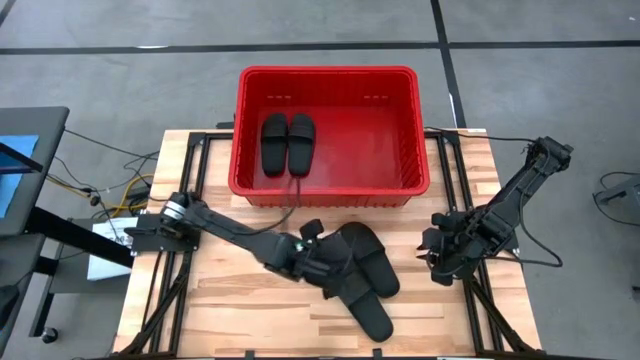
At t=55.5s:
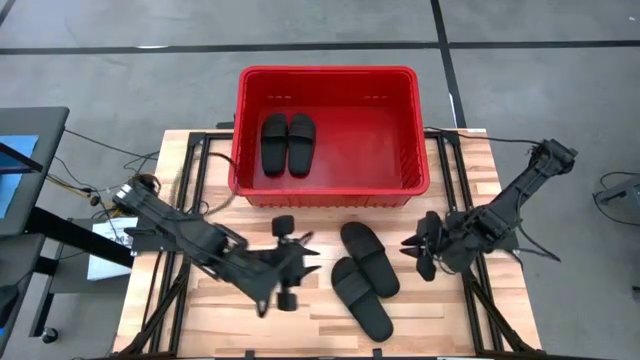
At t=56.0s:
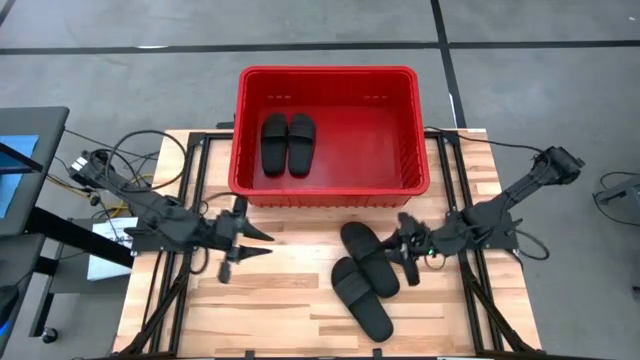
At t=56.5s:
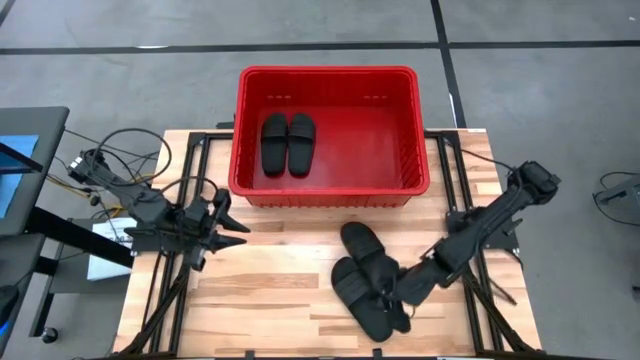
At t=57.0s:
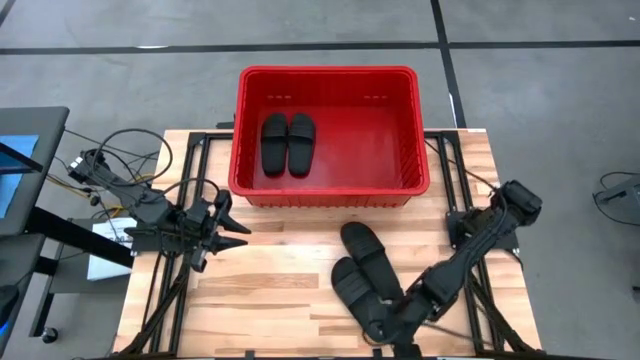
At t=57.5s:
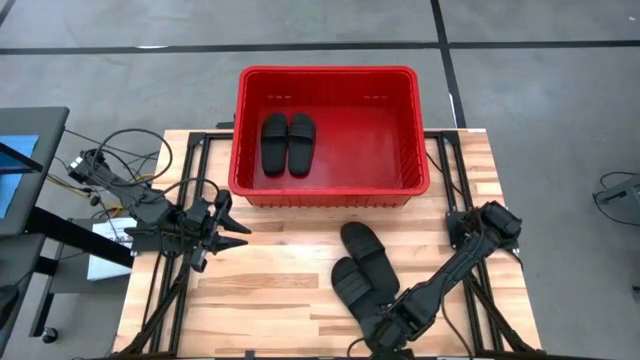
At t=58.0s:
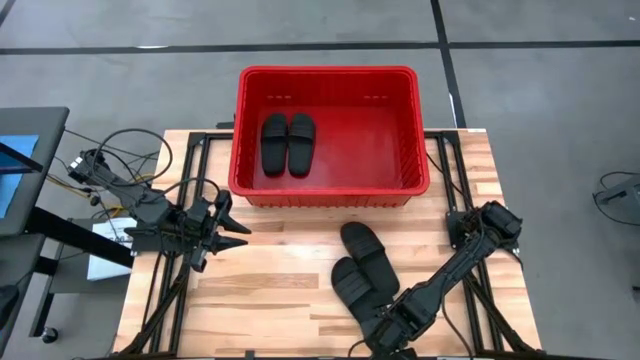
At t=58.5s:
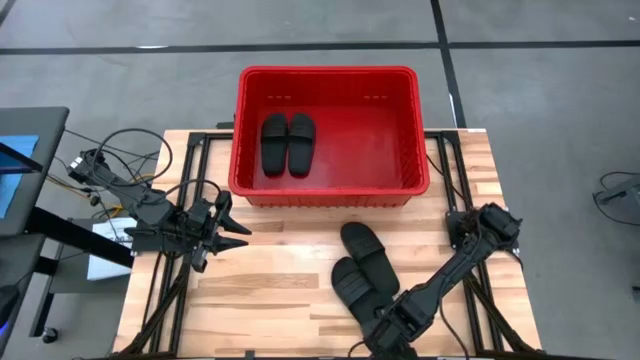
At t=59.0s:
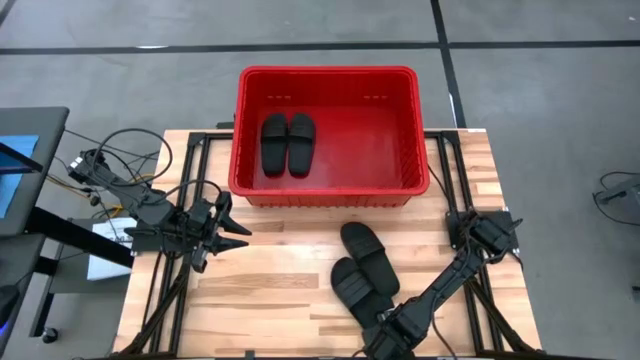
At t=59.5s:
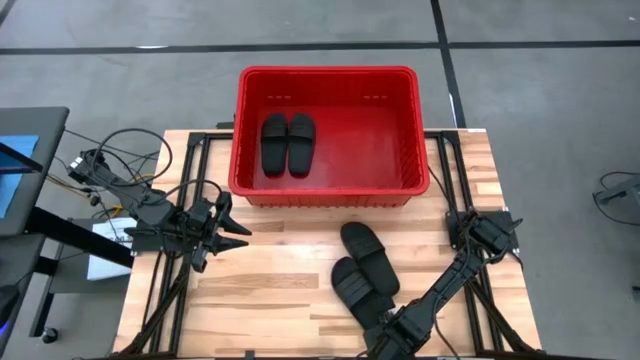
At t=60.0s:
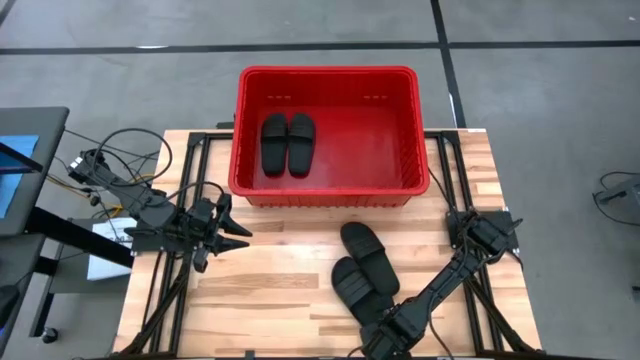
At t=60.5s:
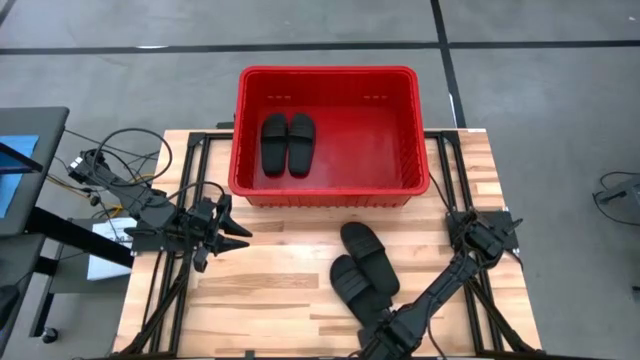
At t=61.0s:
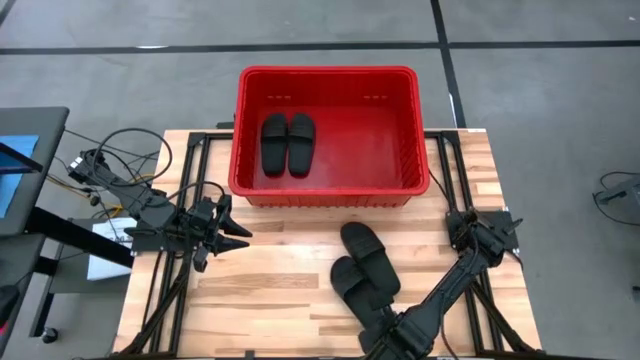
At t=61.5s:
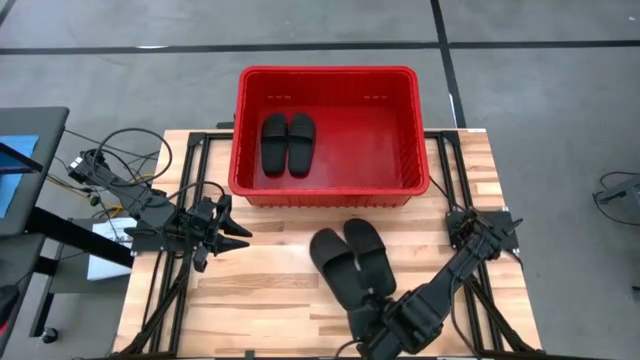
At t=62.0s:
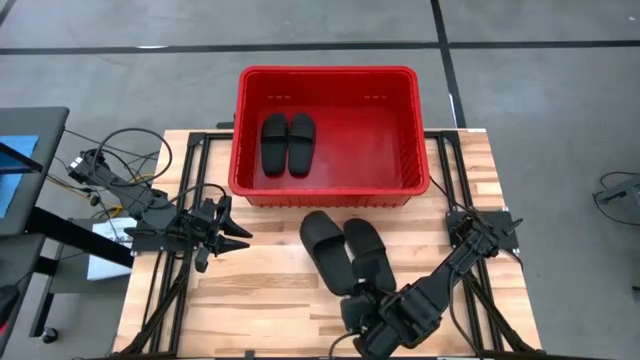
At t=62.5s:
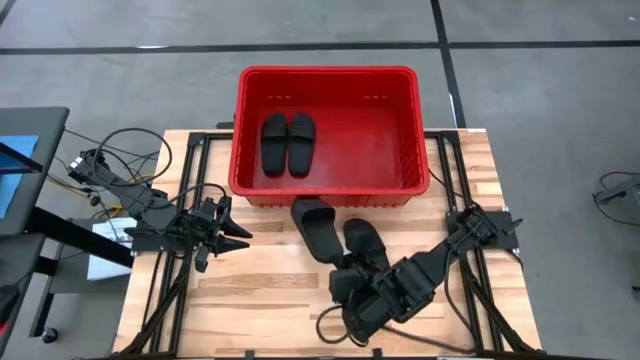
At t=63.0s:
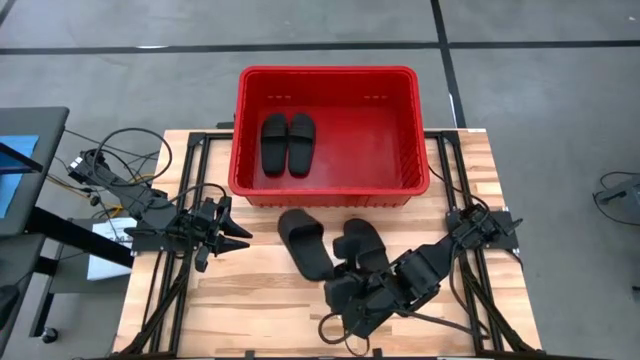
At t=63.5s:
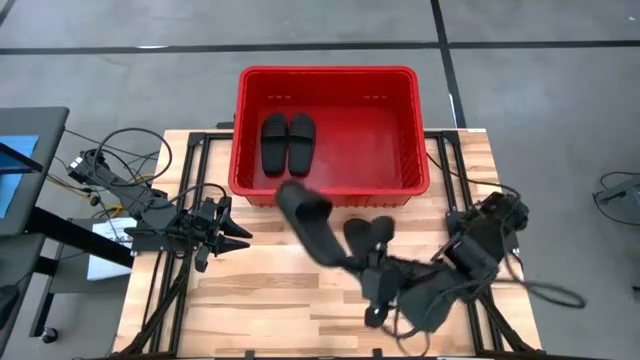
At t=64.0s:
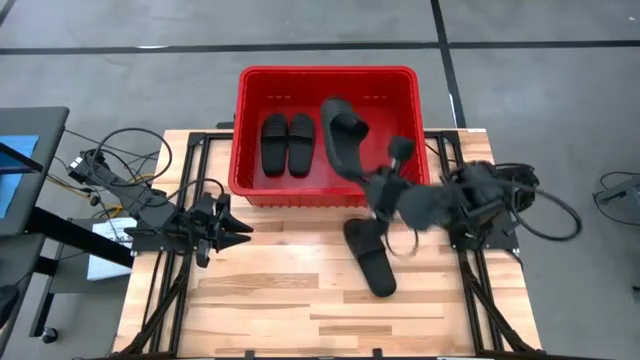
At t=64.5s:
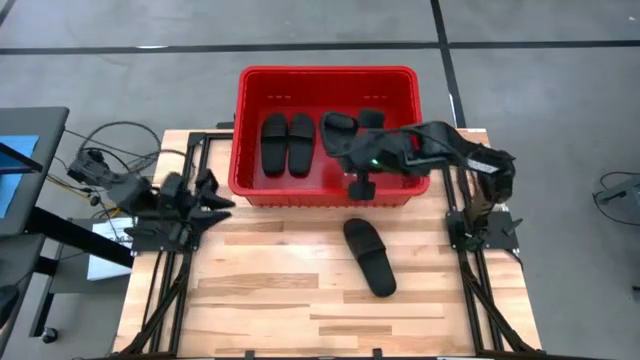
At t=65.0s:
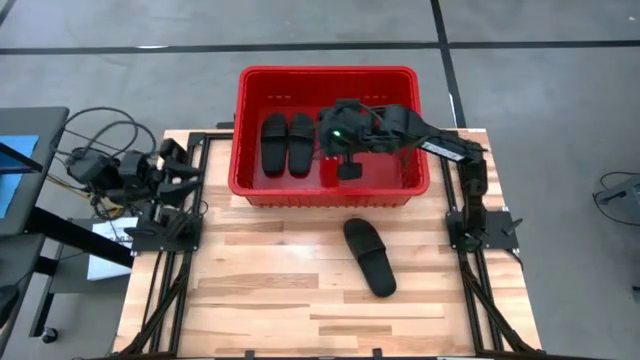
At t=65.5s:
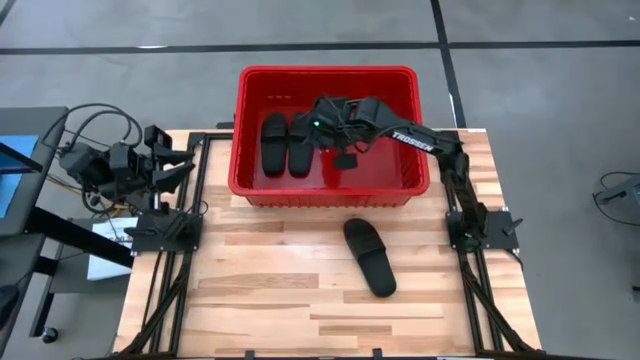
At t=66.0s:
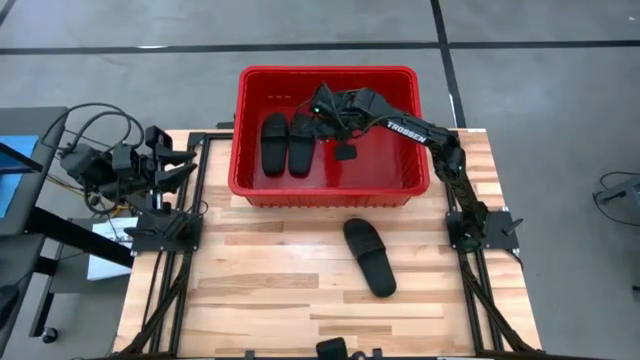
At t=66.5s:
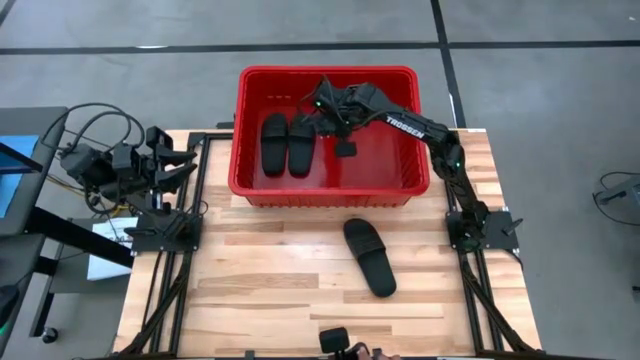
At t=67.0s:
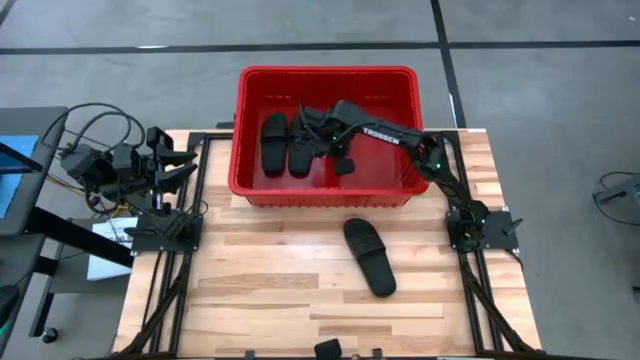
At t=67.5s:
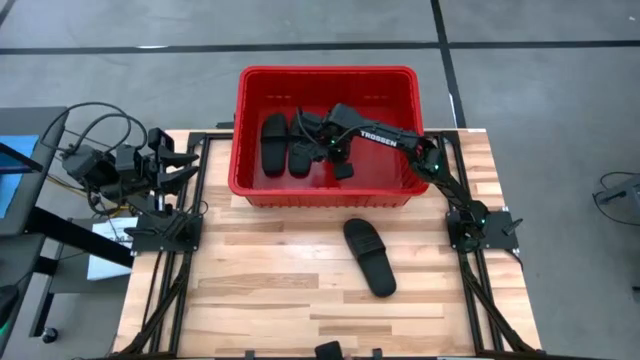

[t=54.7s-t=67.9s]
Task: Pick and place slides into bin
Put the black slide into the red organizer bin

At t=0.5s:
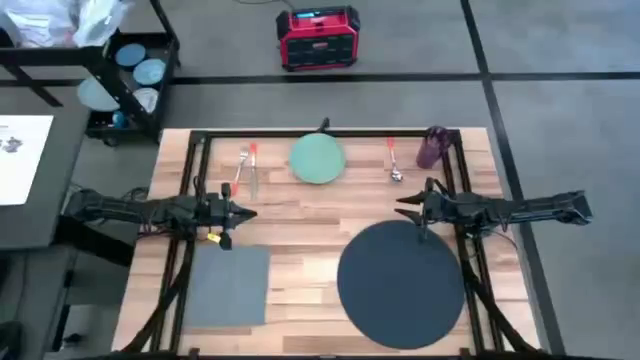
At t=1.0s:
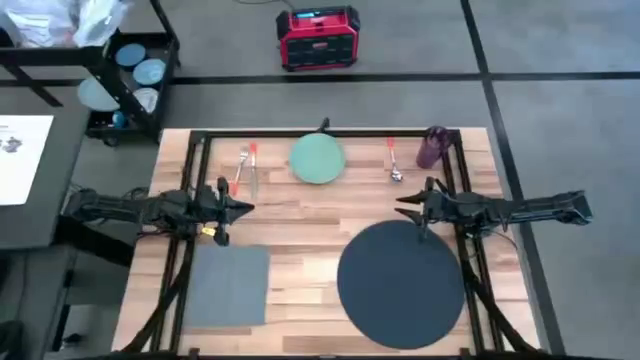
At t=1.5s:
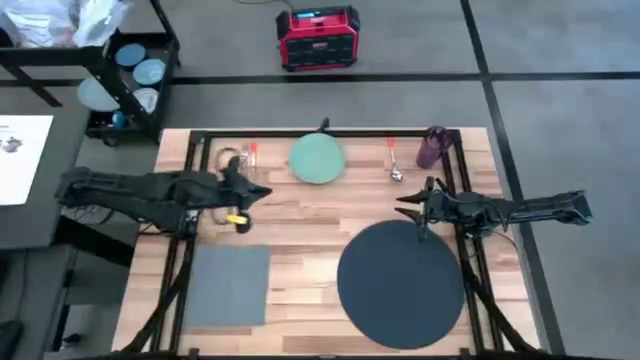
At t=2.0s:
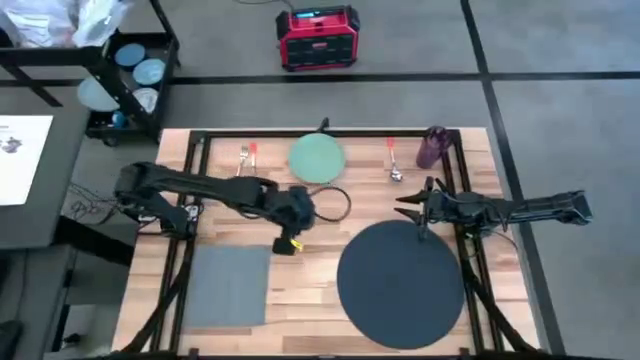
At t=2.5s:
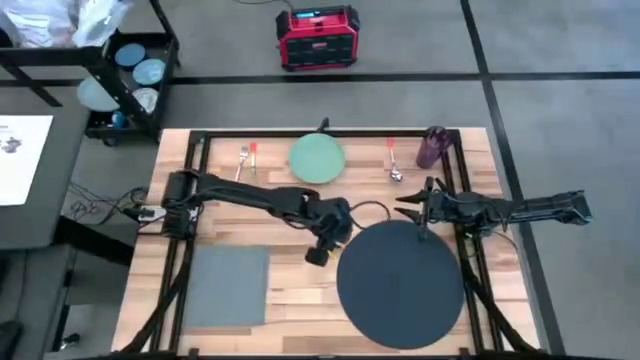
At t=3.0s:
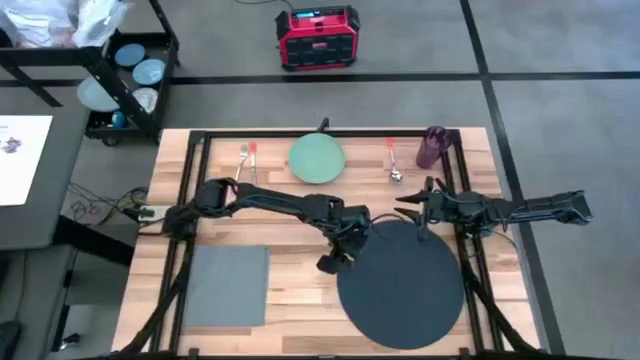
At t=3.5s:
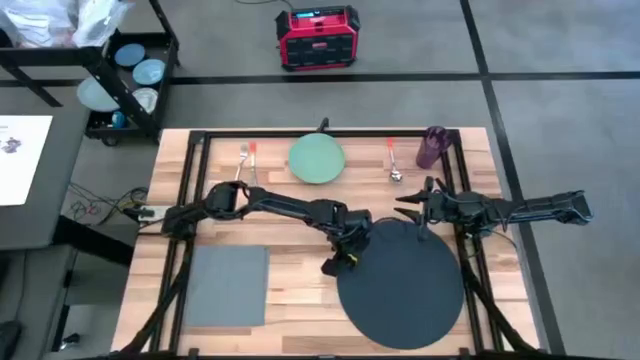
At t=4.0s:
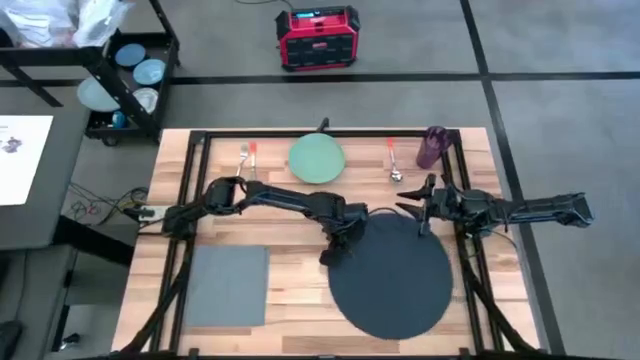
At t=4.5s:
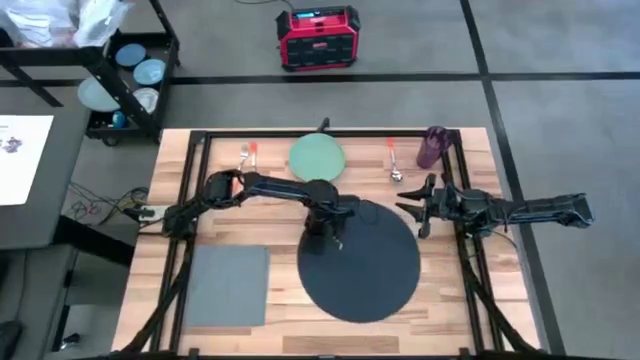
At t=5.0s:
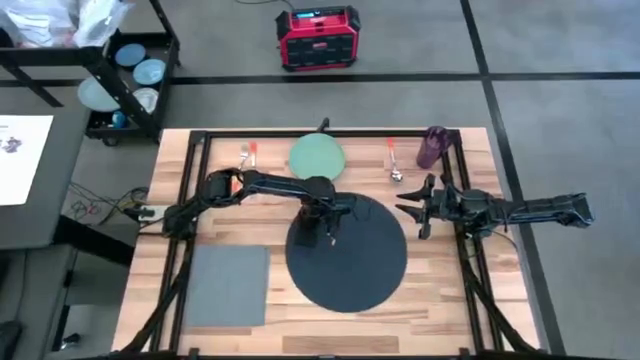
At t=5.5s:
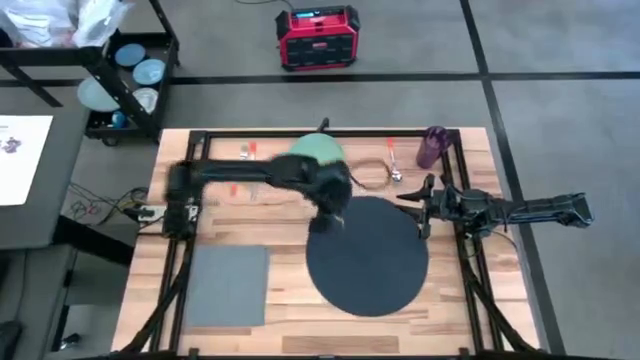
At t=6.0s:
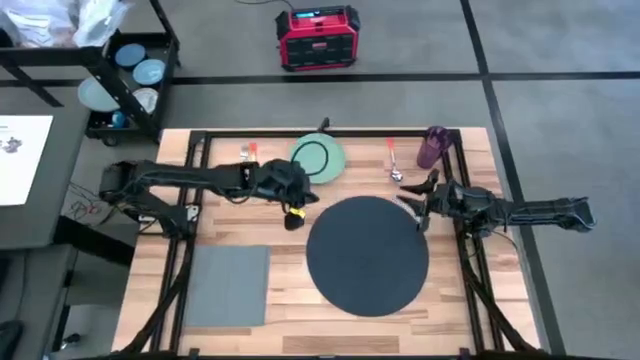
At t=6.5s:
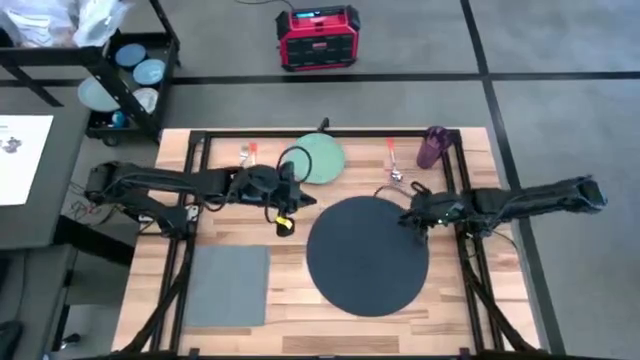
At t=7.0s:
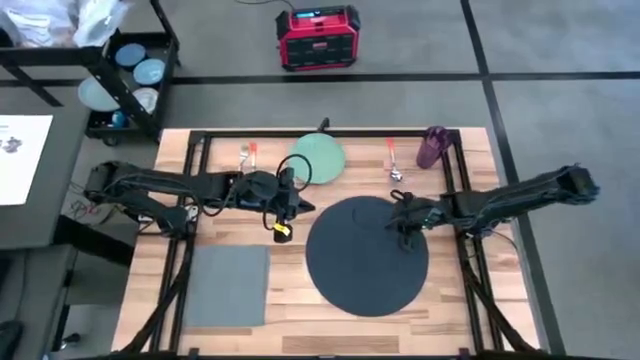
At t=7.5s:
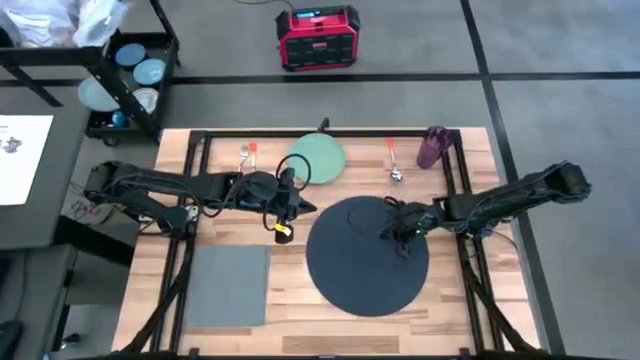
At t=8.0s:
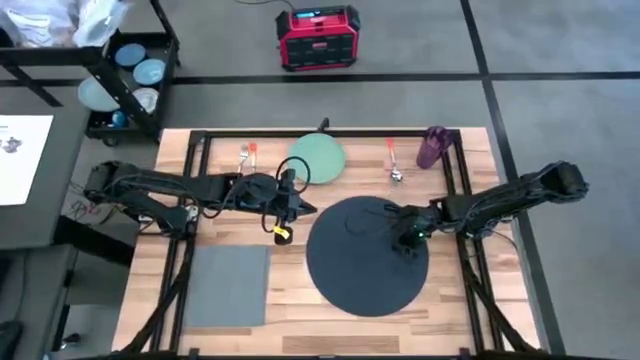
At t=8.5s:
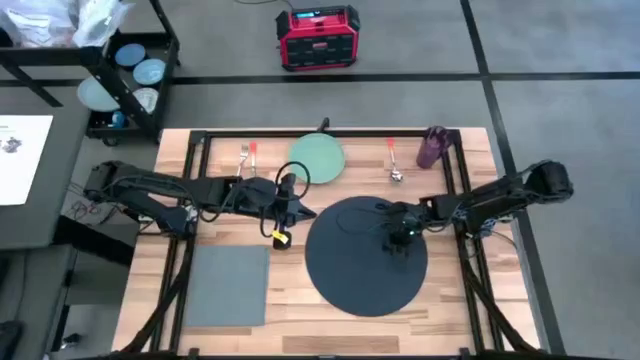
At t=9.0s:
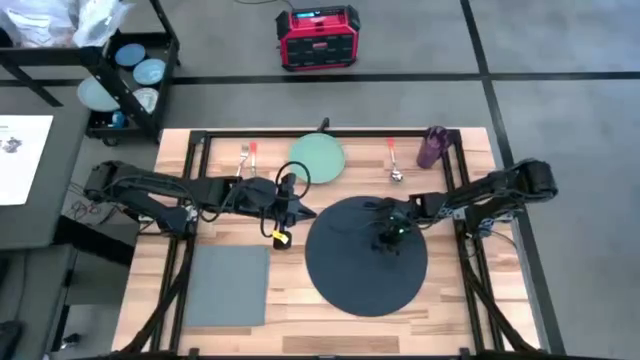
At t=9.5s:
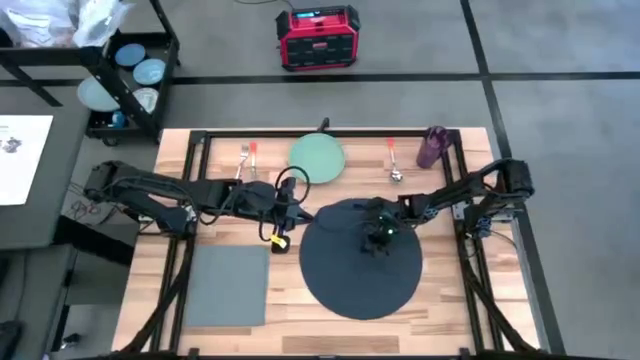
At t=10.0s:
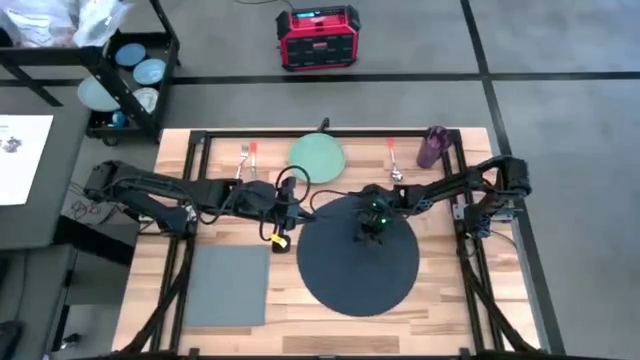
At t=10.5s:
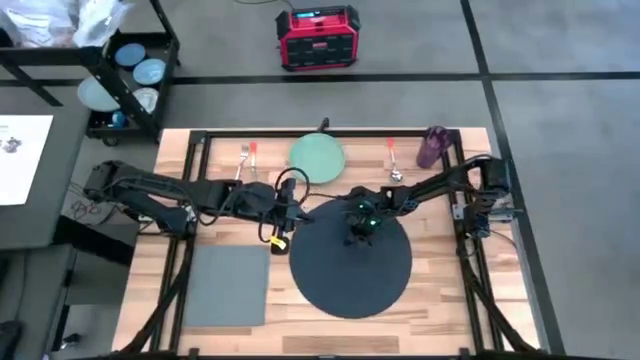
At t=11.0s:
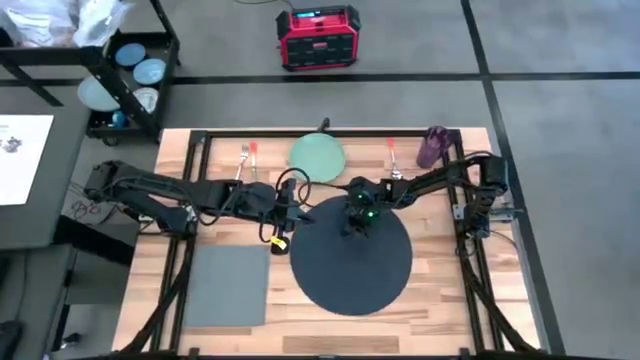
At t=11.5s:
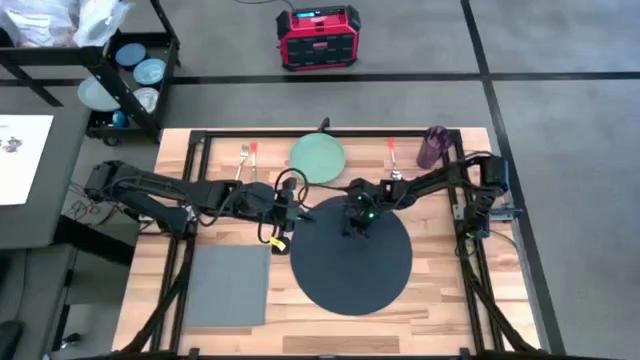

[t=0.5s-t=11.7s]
Task: Set table place
Move the blue placemat to the center
